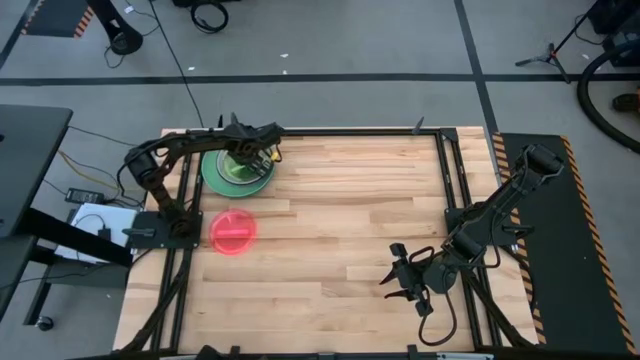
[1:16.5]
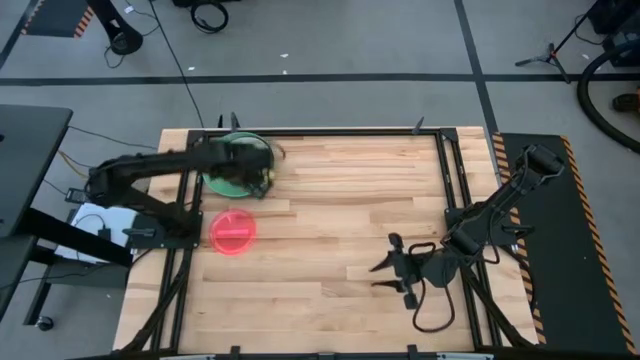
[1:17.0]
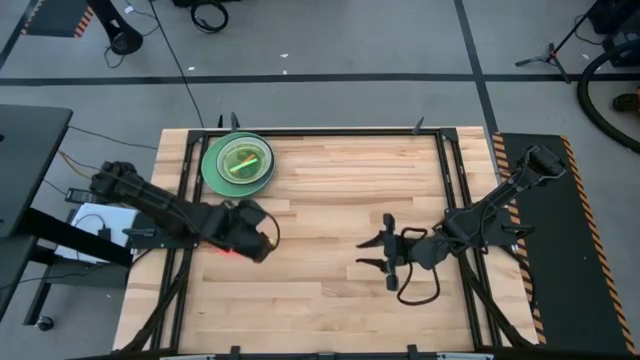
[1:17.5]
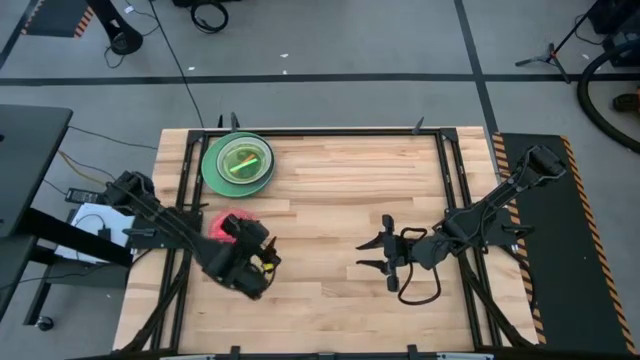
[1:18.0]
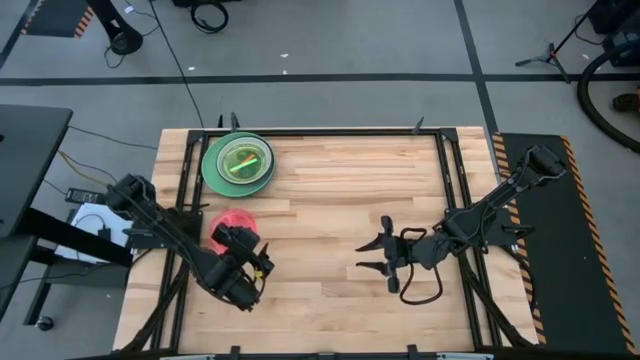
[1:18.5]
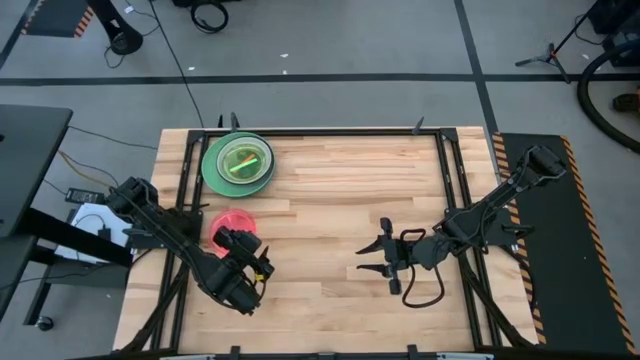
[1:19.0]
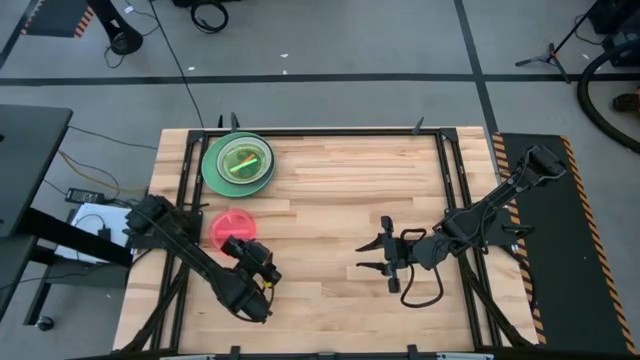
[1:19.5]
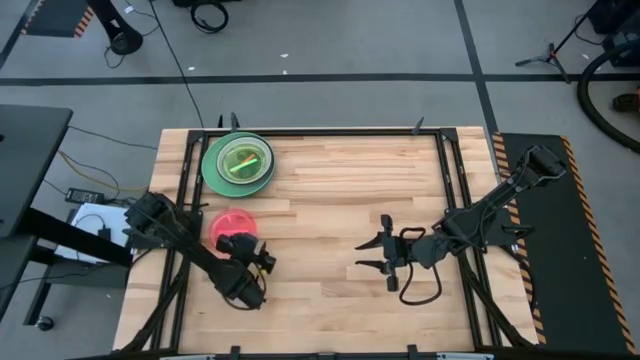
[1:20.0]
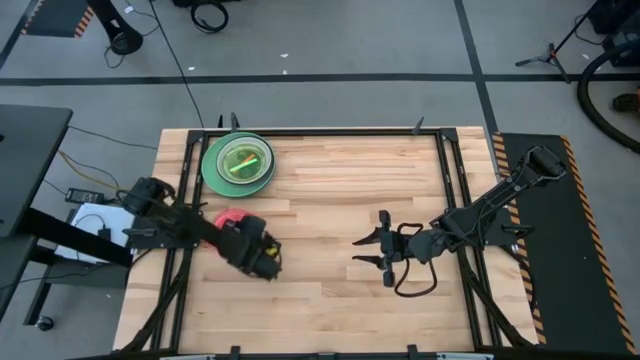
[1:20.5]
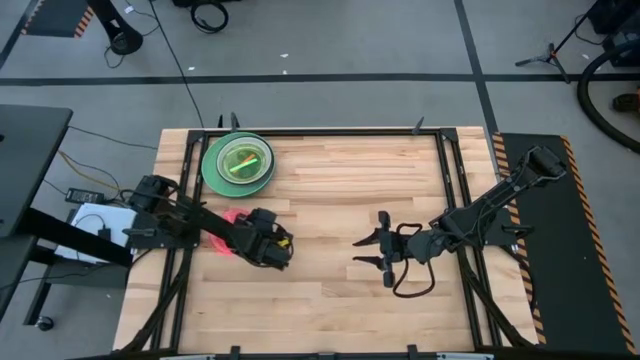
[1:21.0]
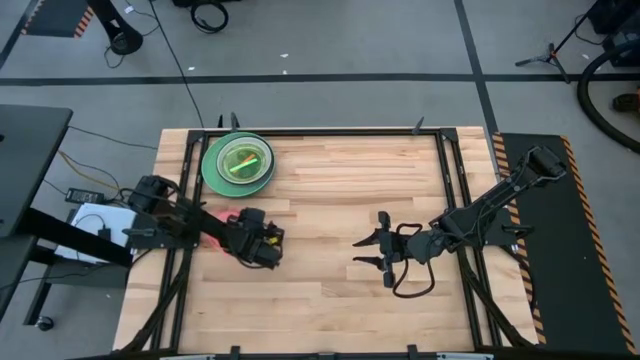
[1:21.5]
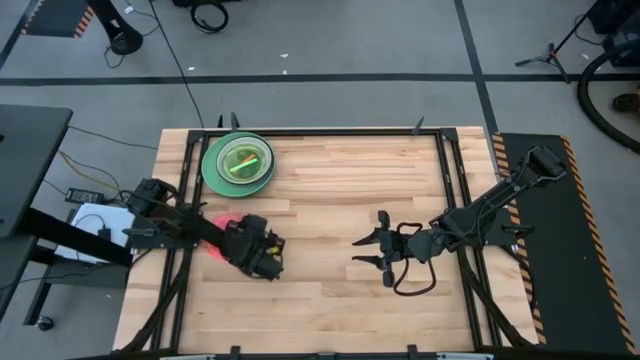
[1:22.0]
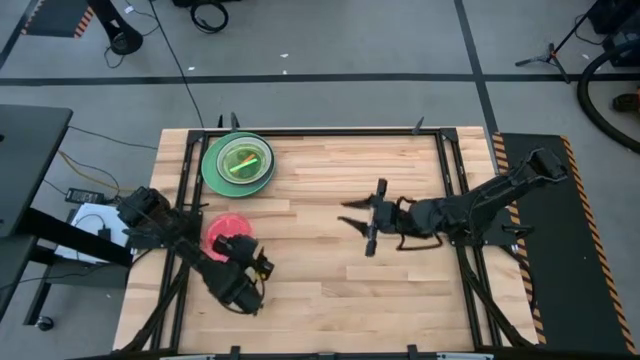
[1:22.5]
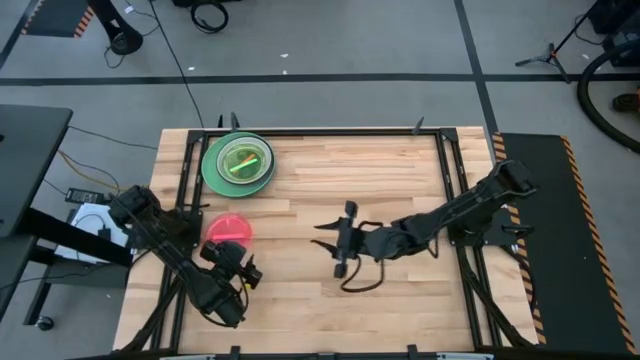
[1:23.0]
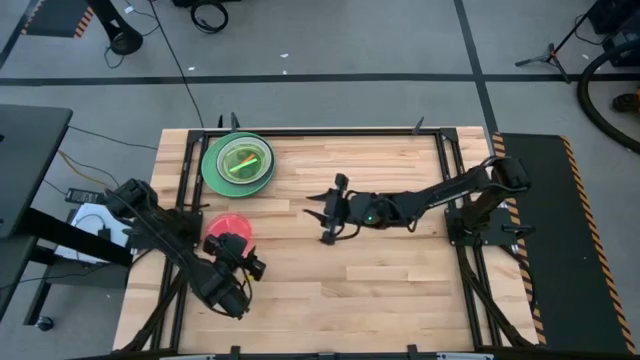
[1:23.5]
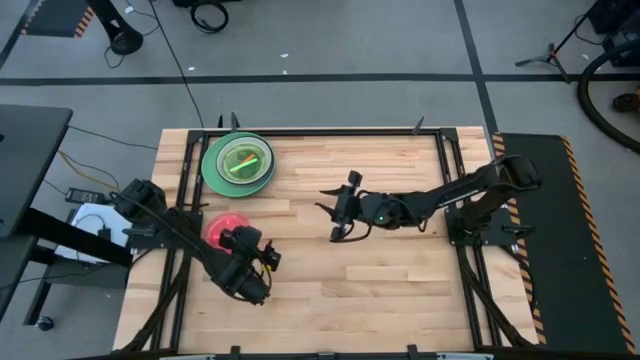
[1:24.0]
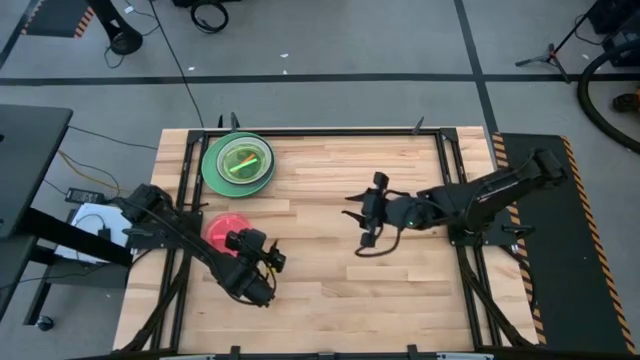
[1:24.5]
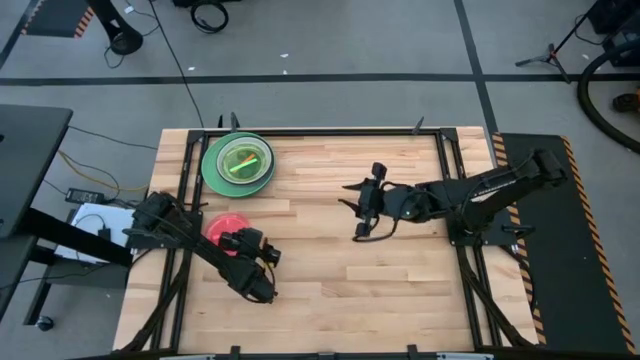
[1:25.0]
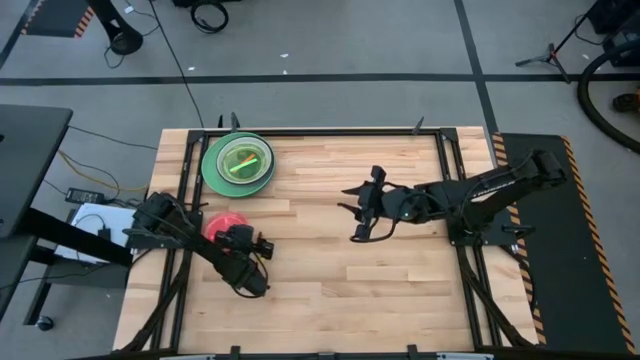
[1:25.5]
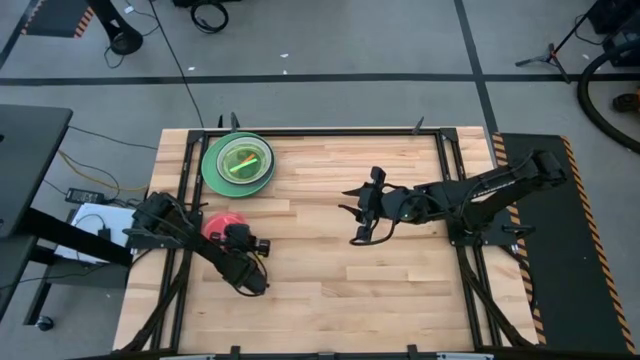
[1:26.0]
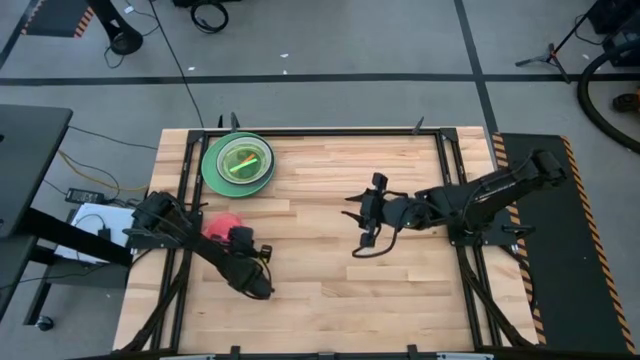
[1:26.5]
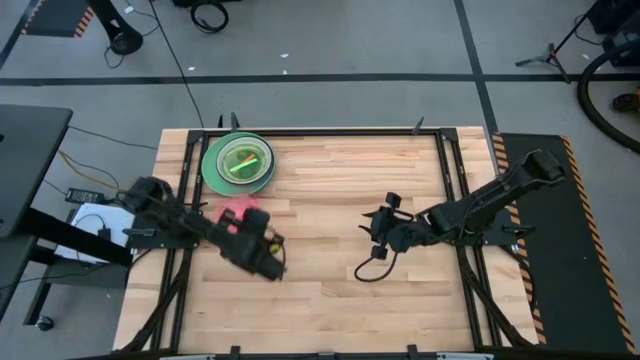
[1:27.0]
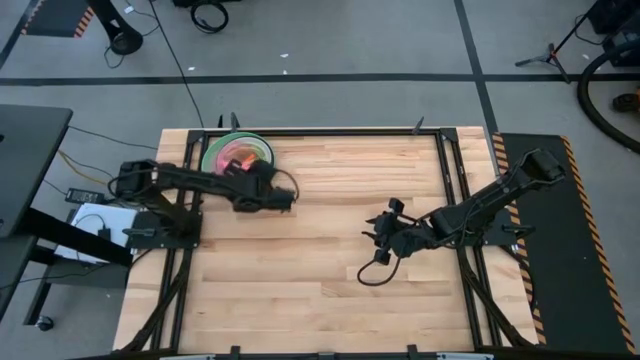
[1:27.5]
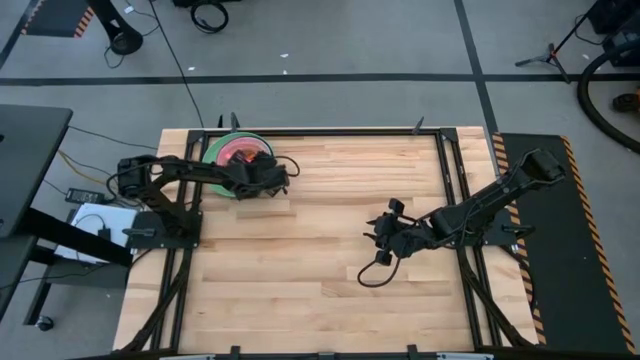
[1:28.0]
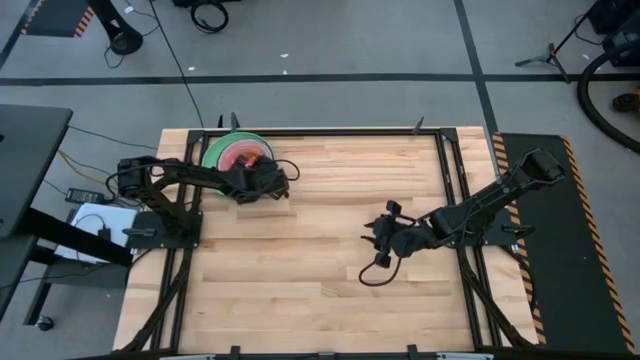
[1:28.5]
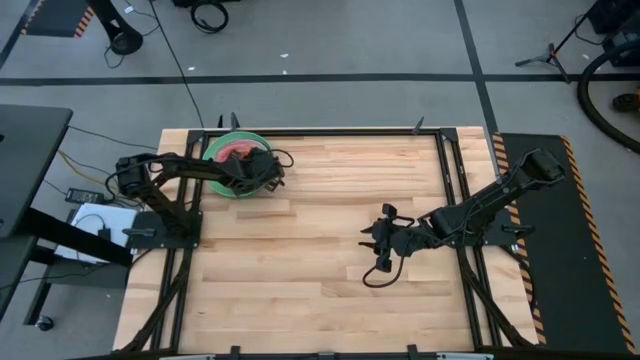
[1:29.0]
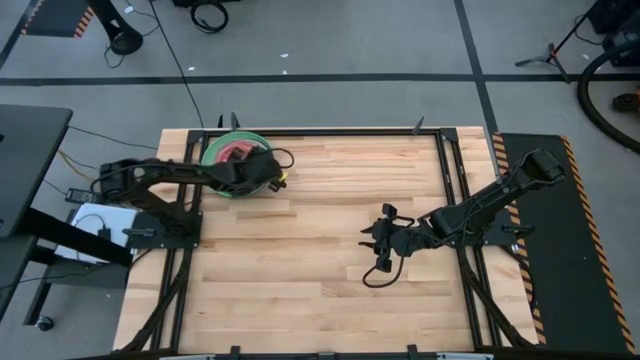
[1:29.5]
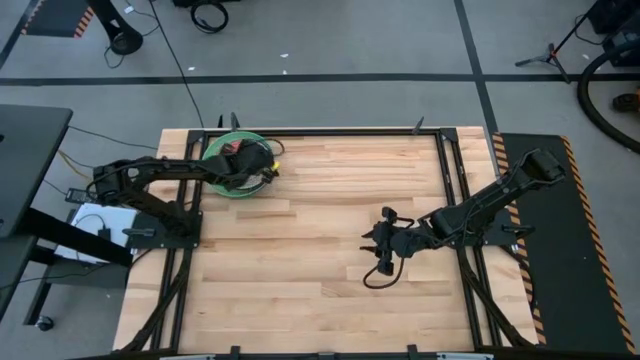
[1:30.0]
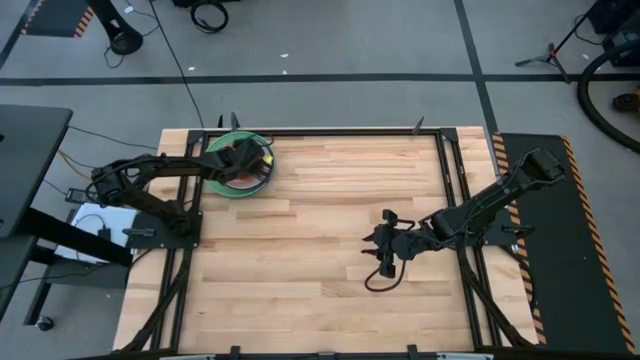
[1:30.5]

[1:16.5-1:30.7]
Task: Stack plastic plates
Stack the pink plate on top of the light green plate

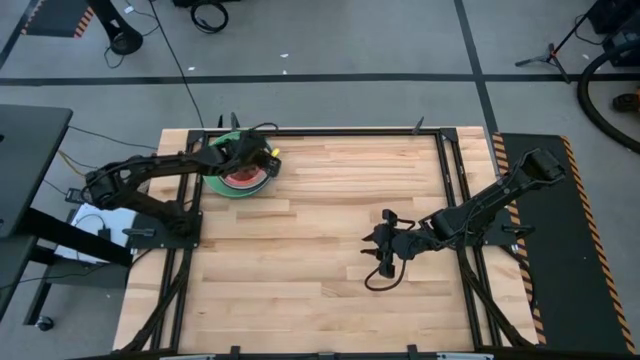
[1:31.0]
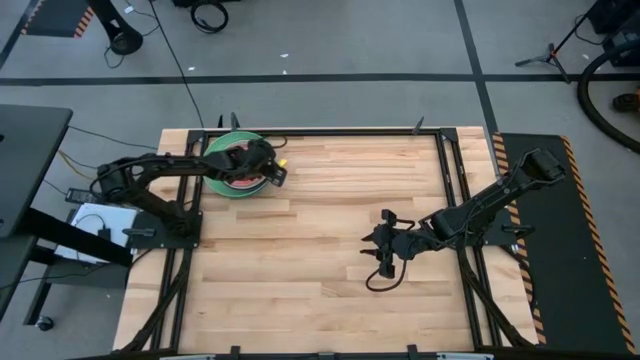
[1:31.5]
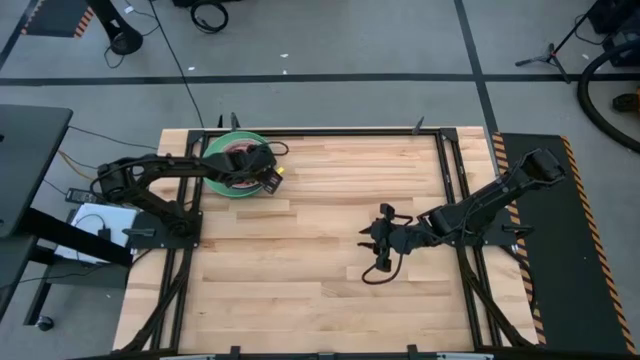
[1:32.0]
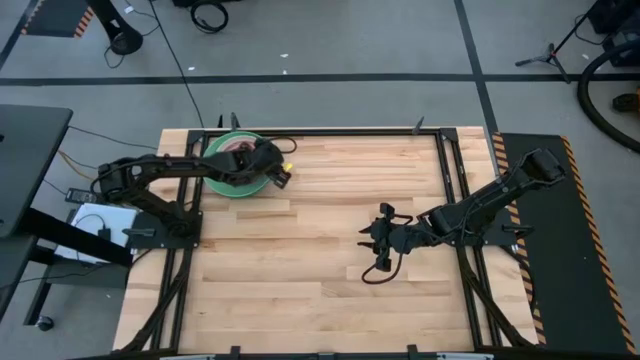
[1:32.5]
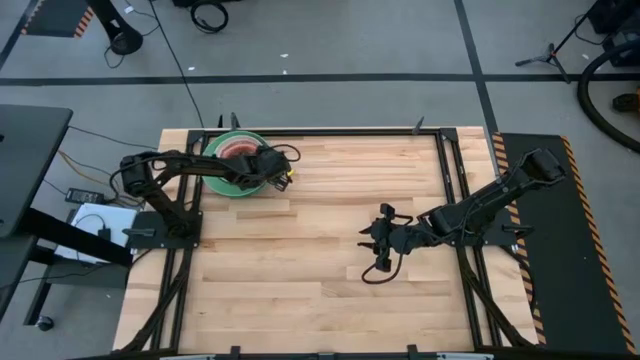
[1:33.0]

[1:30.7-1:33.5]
Adjust the stacked plates

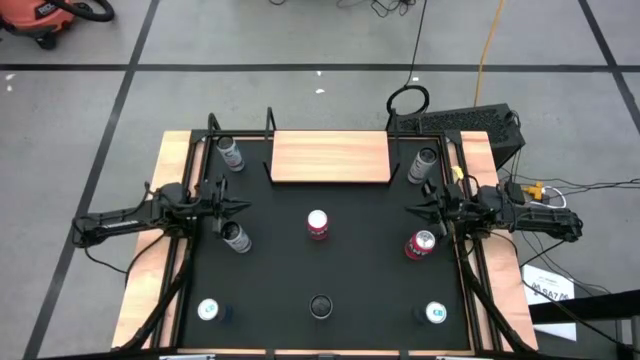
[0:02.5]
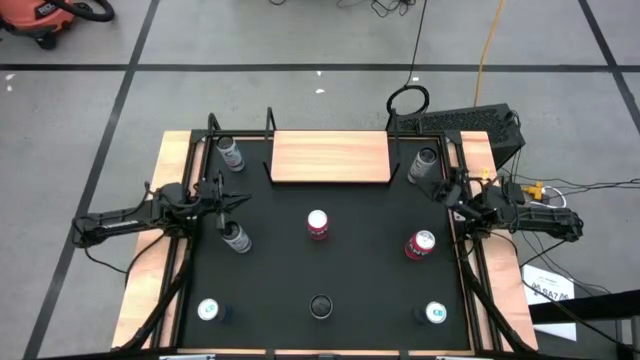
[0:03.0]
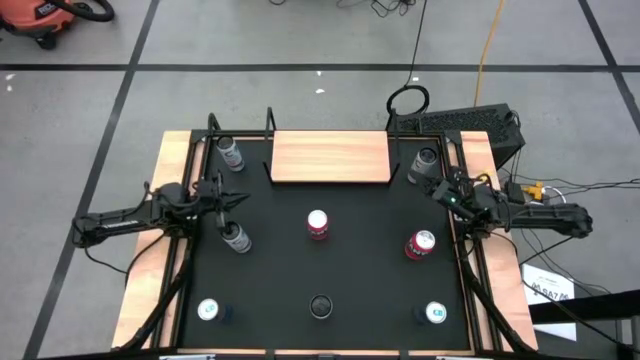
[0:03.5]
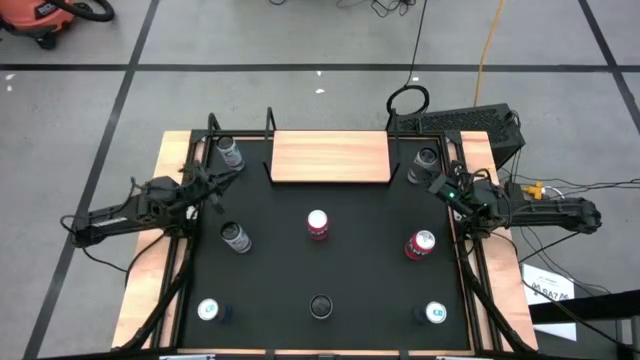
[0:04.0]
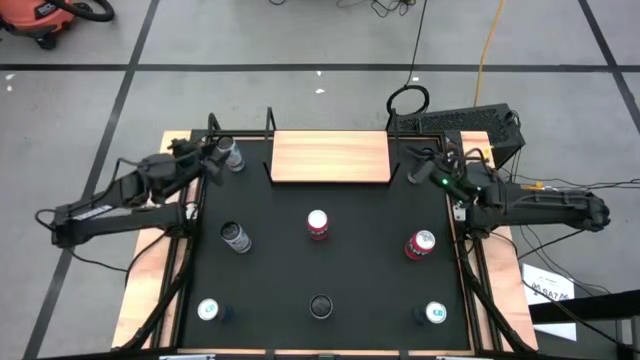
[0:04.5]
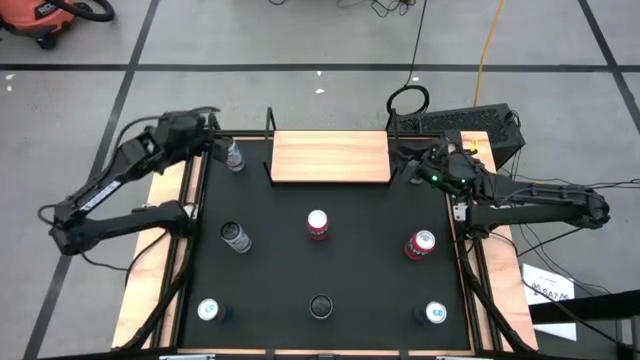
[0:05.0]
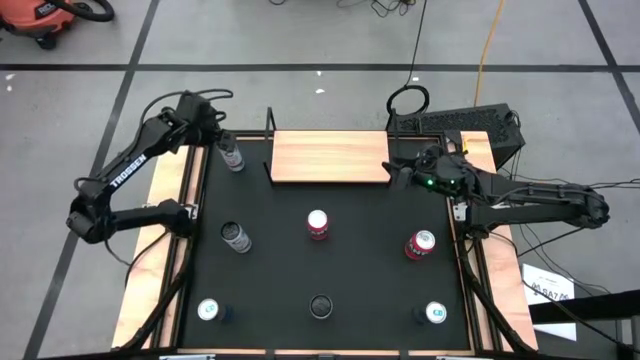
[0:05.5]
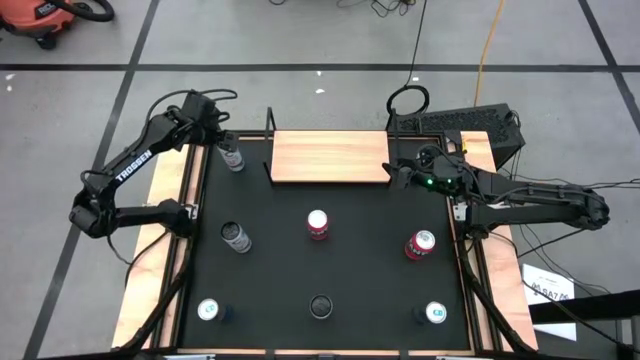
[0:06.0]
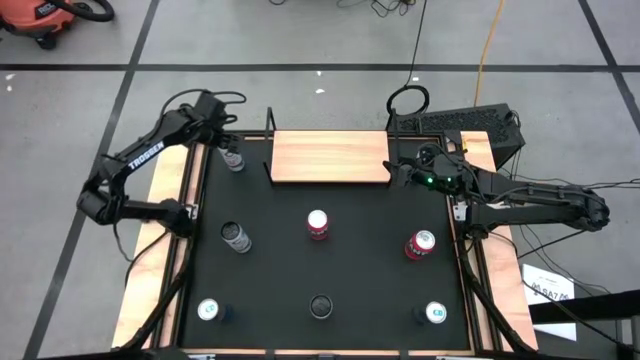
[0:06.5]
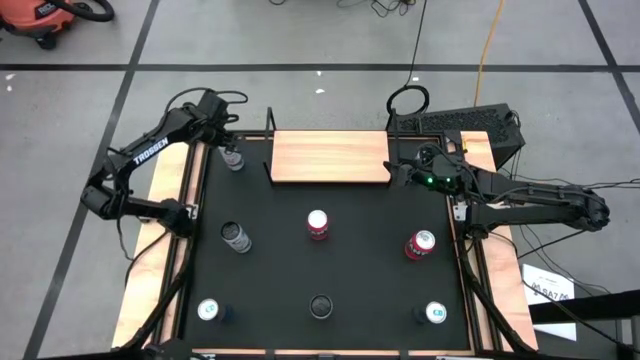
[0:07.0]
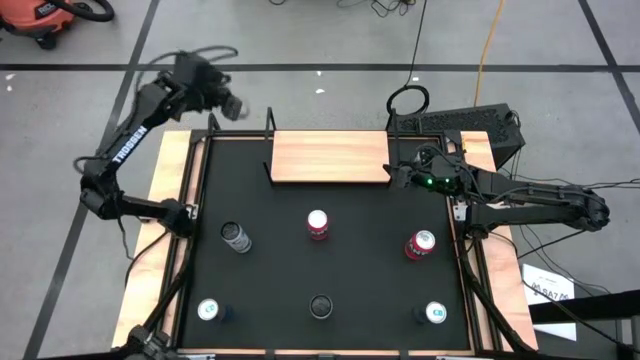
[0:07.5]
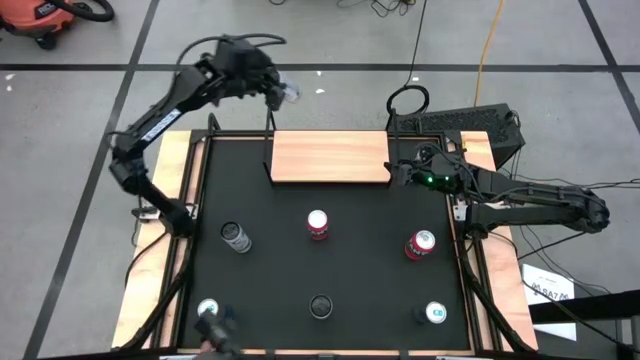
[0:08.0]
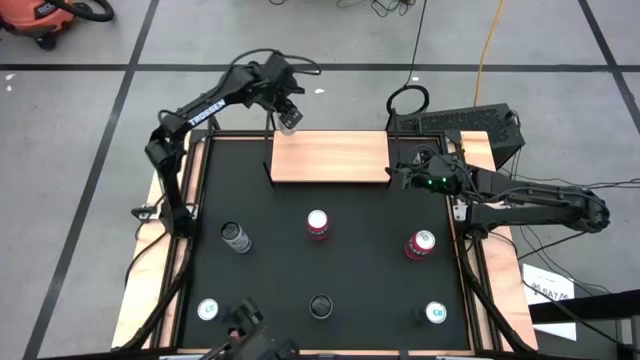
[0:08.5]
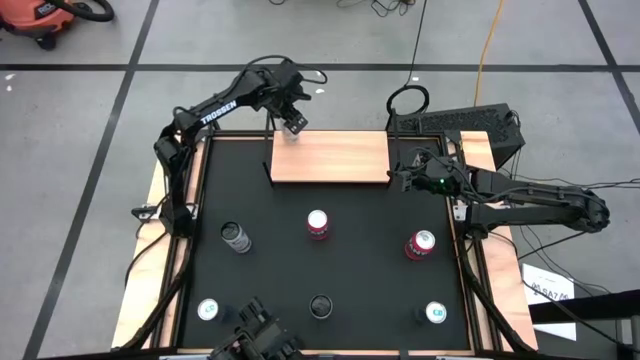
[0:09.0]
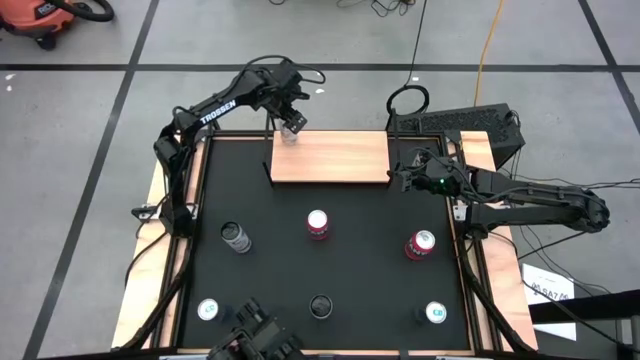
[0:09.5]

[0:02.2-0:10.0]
Task: Place canned beverage on shelf
Put the top white pink soda can on the shelf
